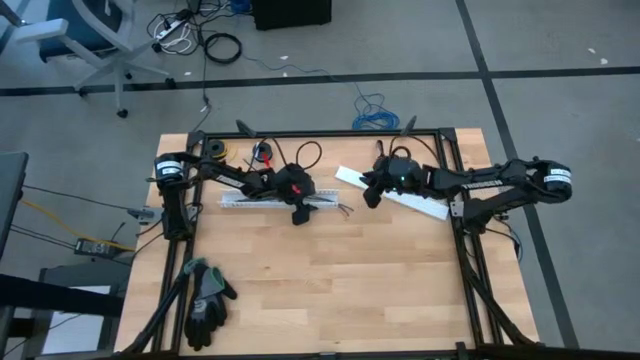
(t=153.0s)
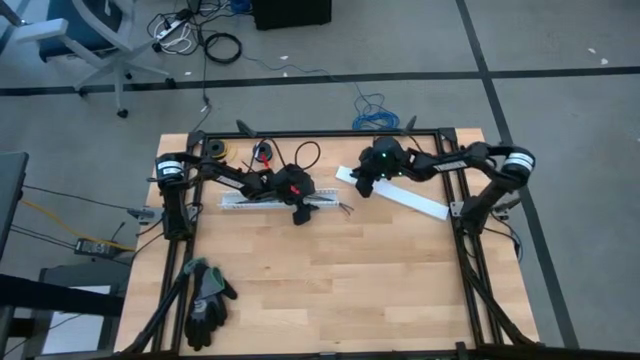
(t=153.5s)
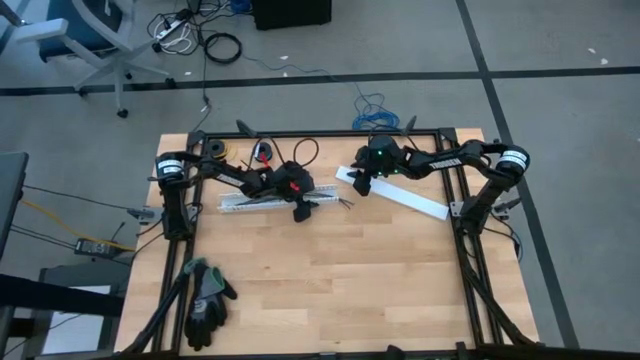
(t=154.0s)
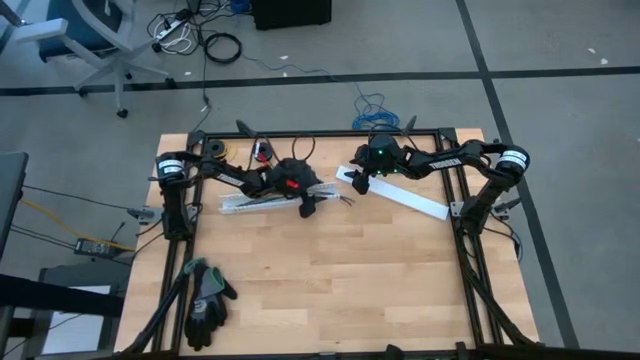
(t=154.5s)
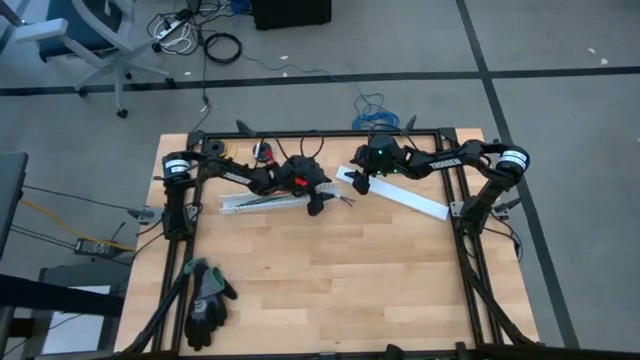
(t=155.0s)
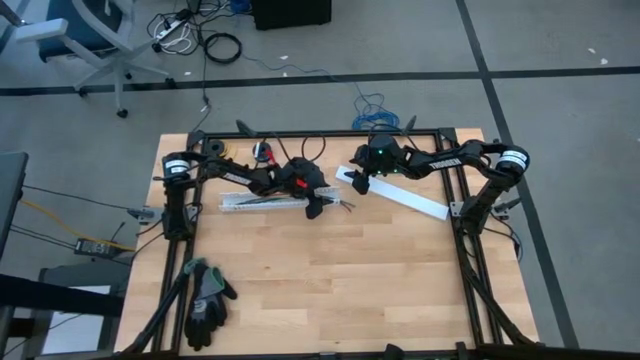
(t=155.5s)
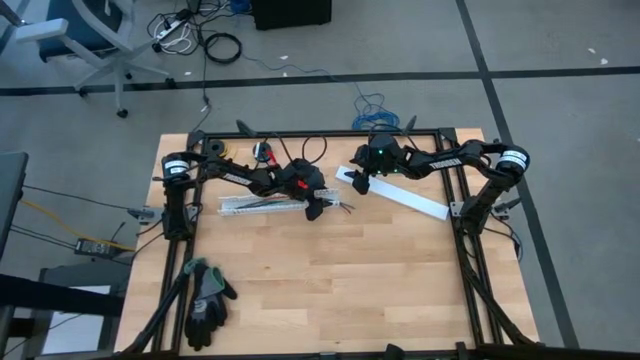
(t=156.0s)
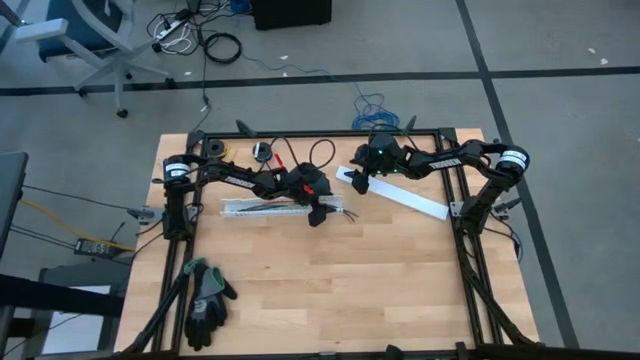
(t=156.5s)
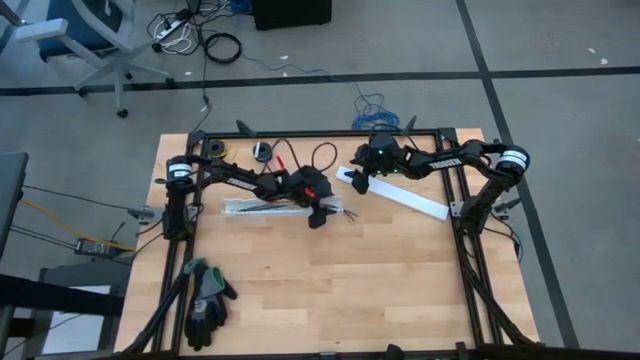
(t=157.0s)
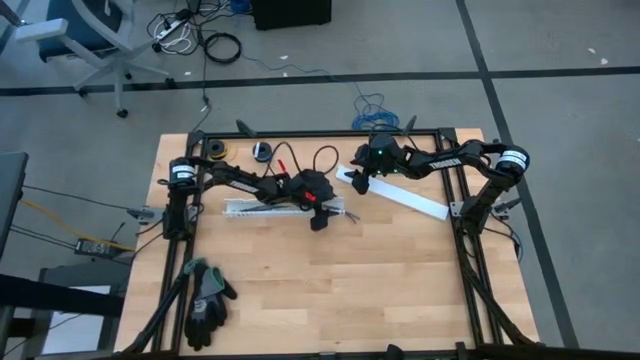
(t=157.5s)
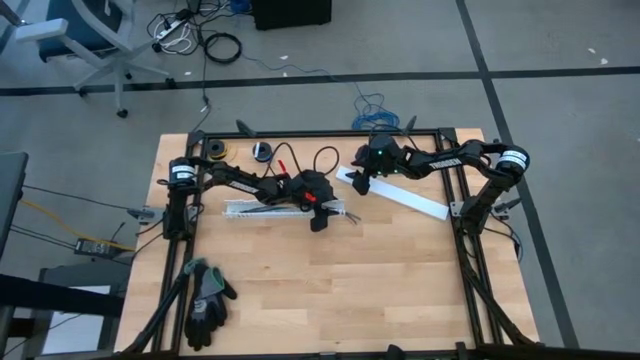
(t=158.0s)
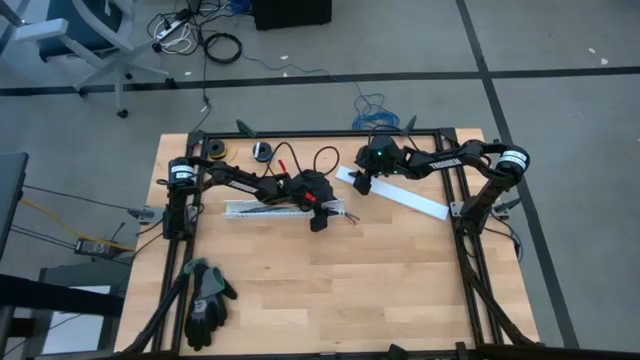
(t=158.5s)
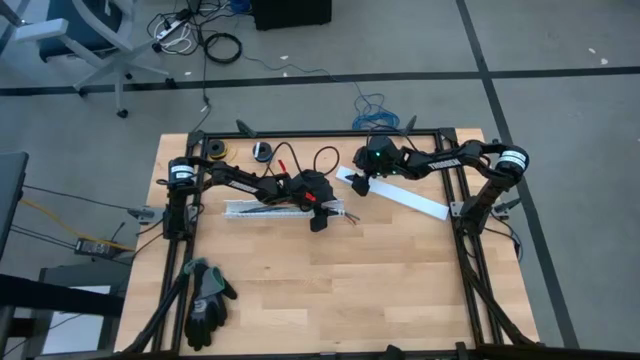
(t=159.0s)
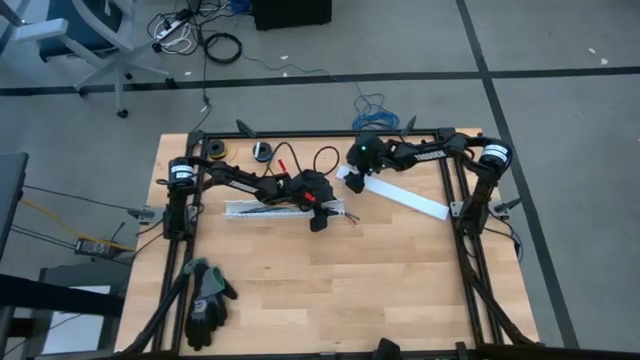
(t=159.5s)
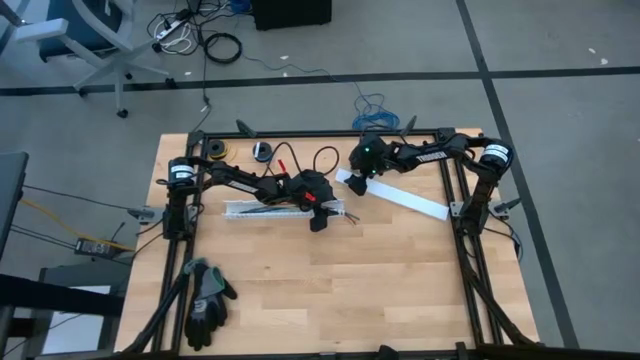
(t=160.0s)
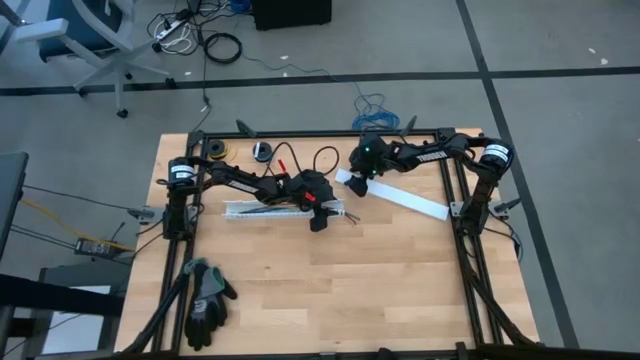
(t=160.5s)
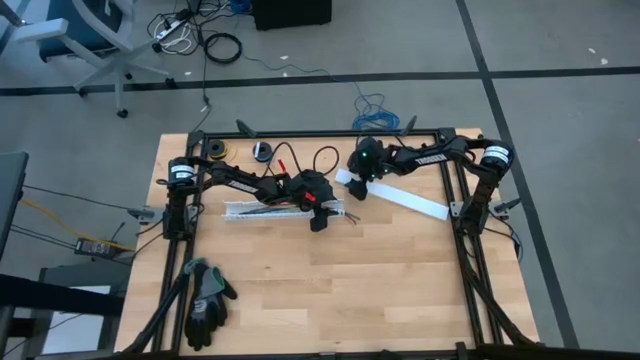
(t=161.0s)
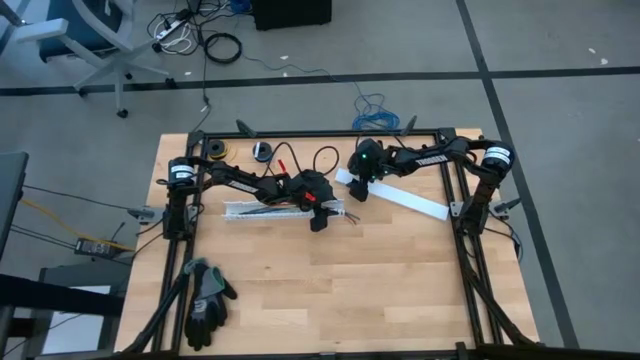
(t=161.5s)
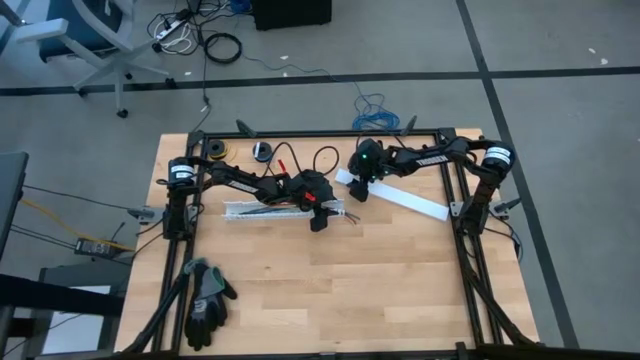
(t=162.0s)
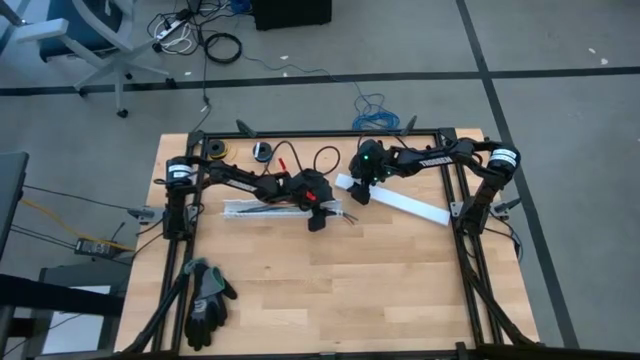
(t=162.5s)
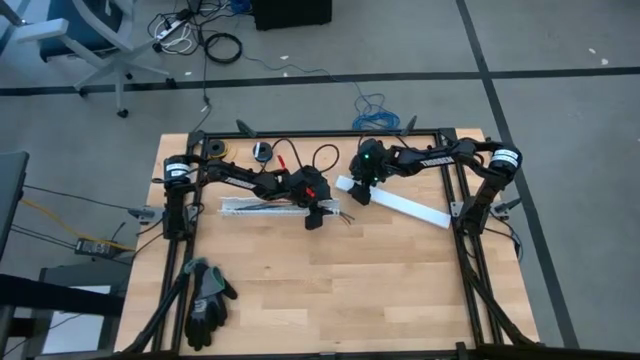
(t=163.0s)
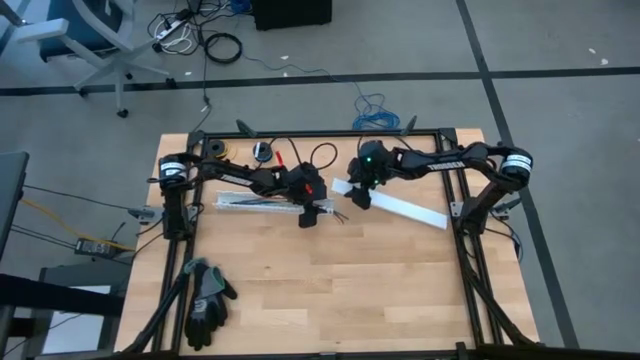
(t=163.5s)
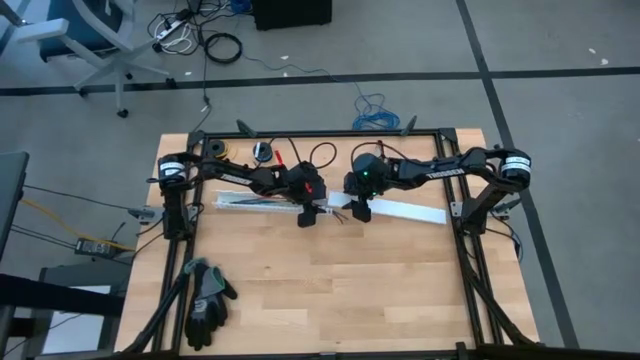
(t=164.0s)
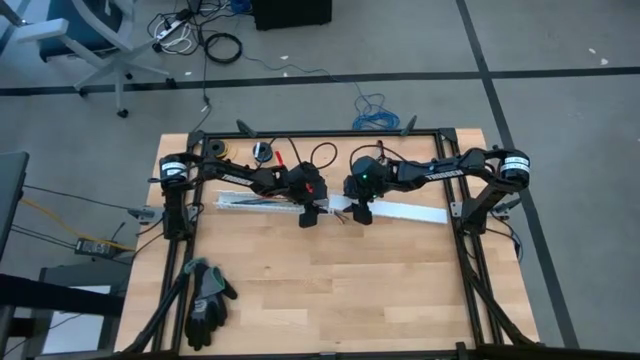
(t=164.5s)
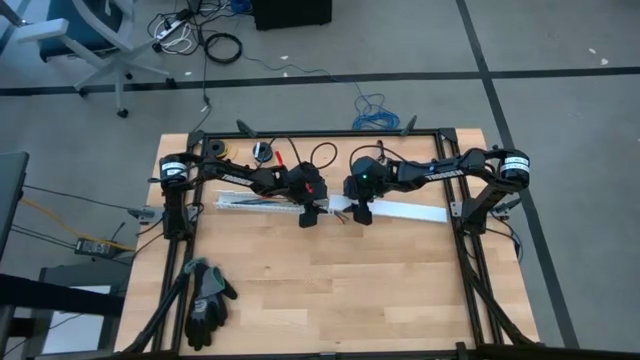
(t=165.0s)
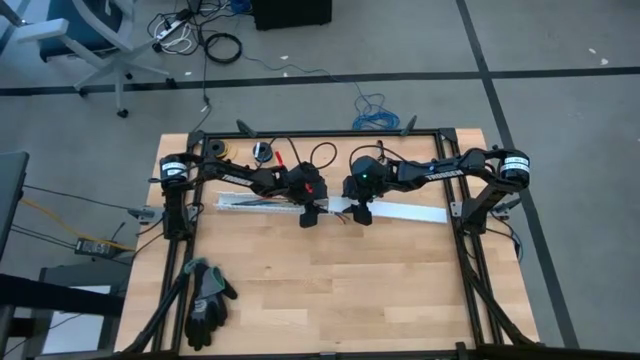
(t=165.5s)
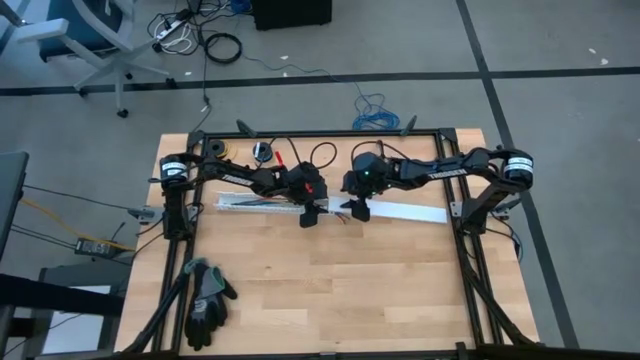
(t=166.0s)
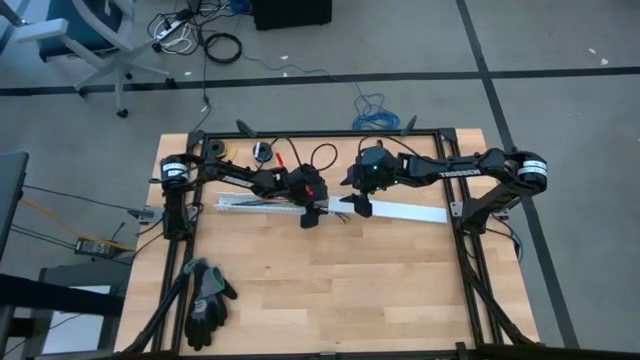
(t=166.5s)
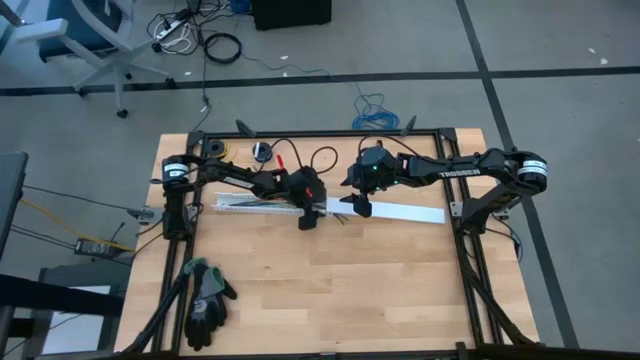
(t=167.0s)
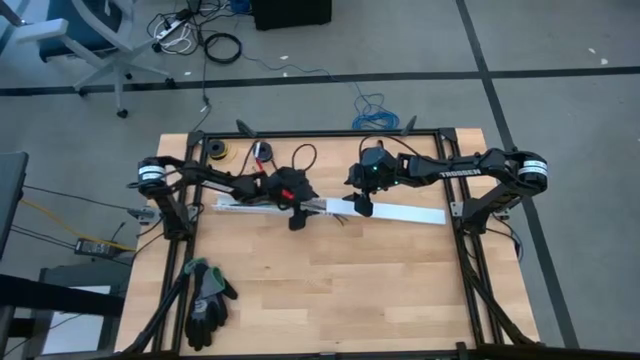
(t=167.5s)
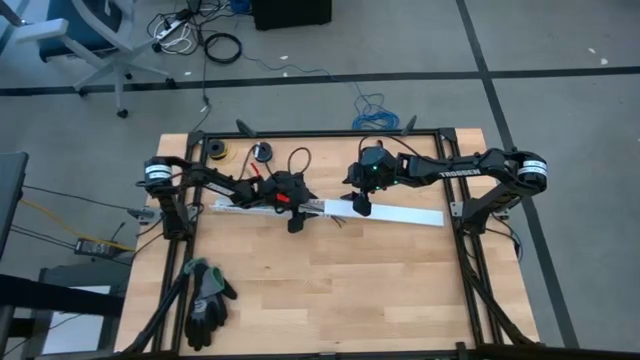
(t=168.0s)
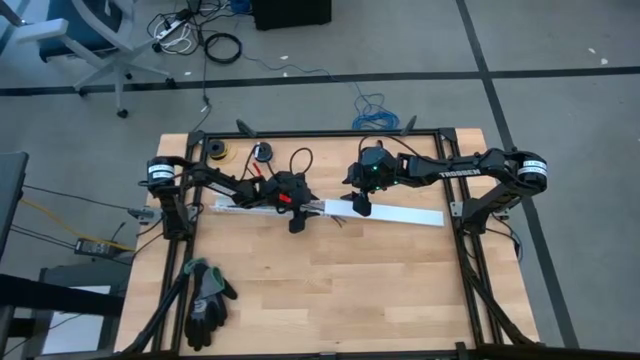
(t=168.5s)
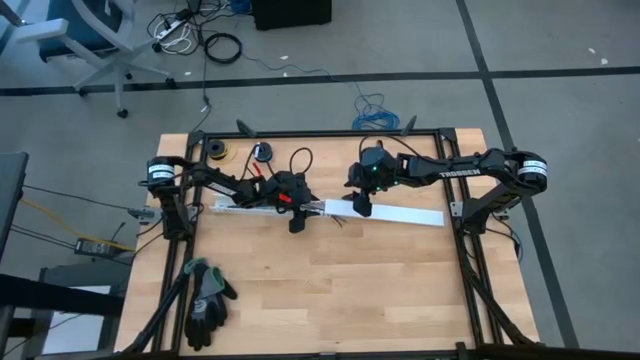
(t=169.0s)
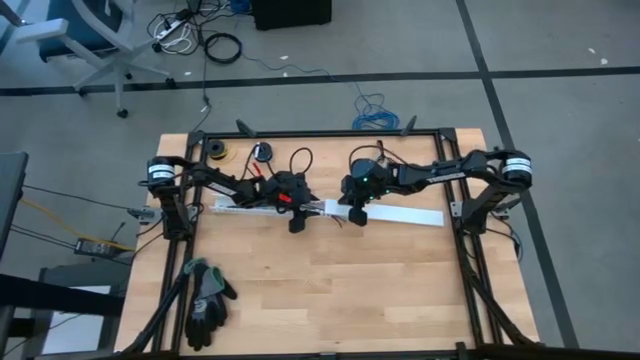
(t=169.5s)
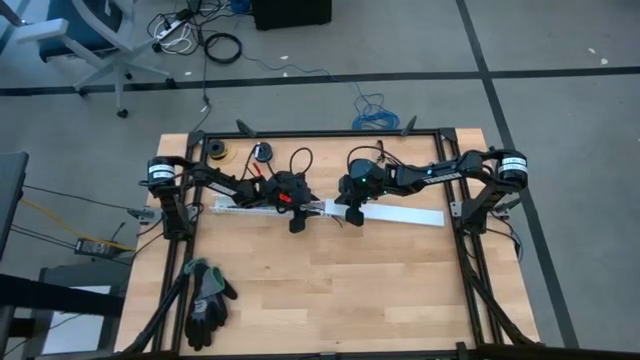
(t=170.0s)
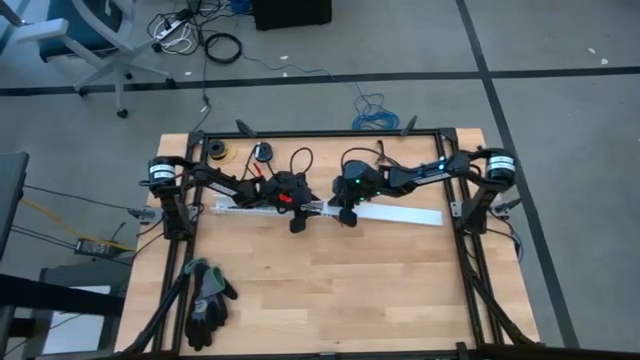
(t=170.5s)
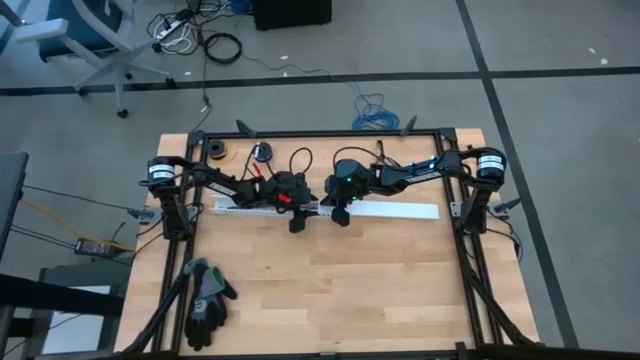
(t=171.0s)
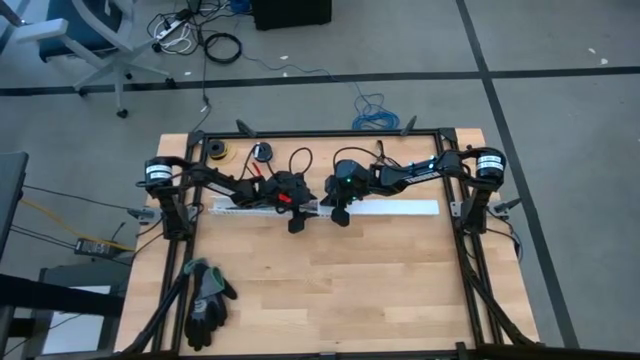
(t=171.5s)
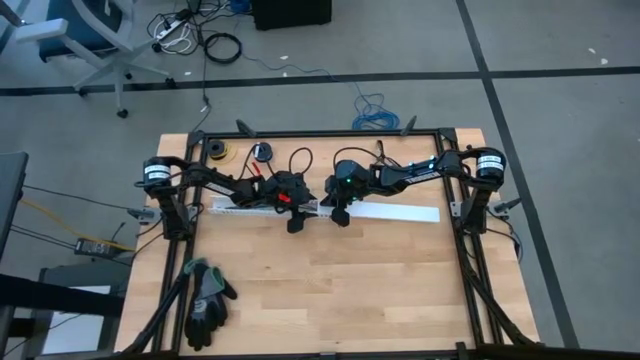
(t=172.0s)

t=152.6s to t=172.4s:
Task: Ziptie cables
Close the cable duct

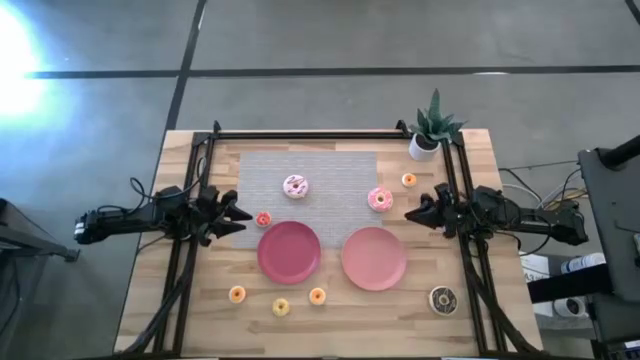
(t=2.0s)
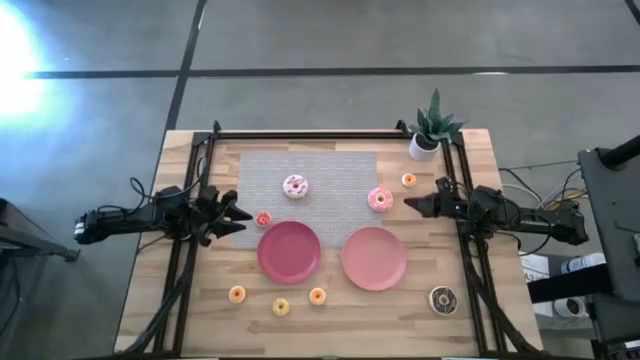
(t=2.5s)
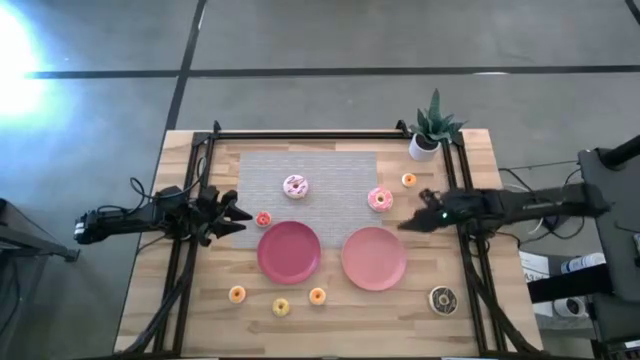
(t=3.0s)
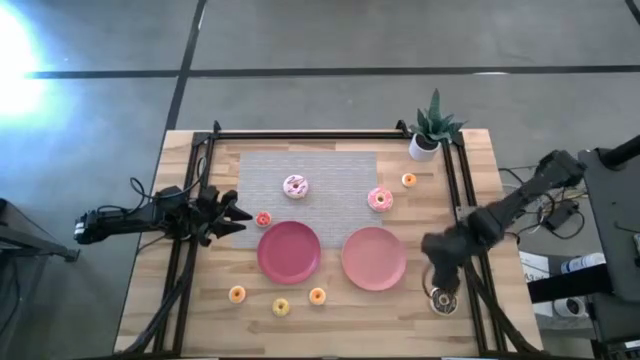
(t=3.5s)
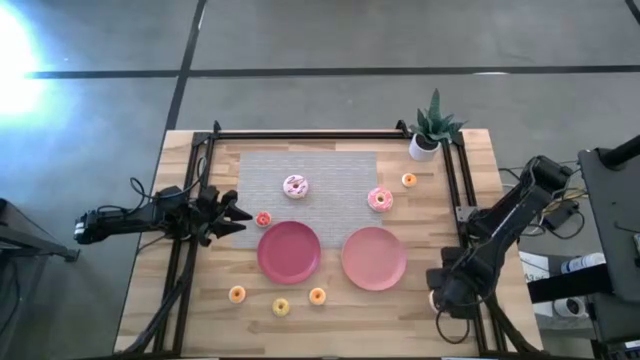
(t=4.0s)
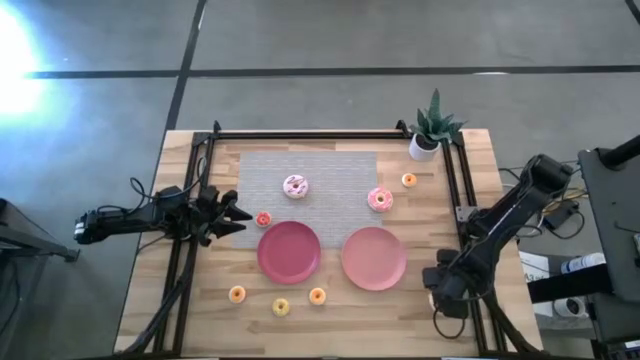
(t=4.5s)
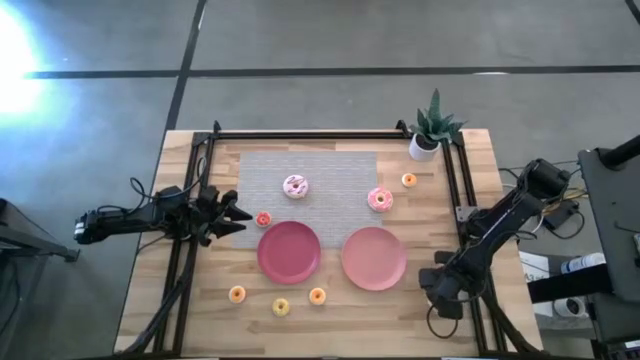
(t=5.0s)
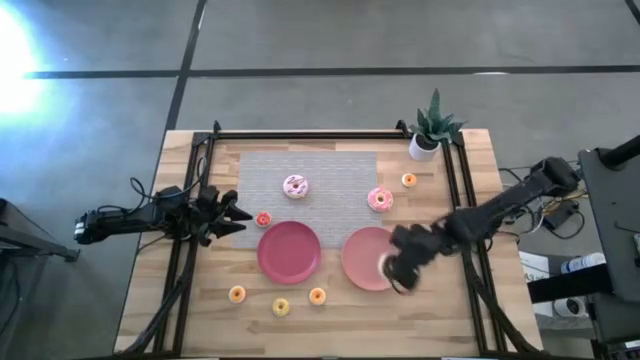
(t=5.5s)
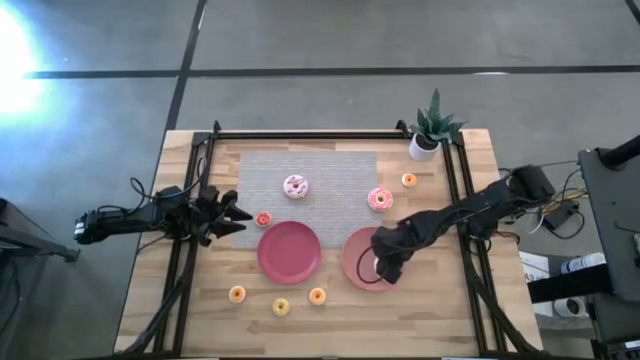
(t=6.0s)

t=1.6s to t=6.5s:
Task: Pick & Place donuts
Put the black big donut on the light pink plate
